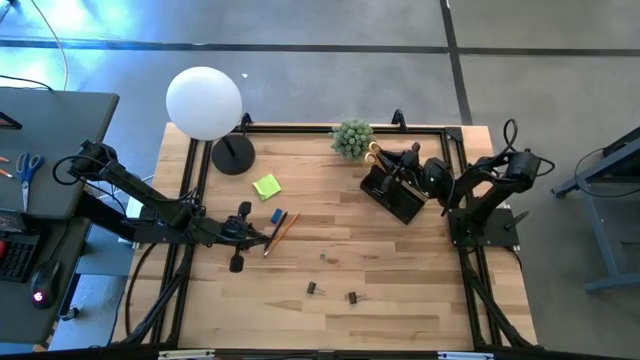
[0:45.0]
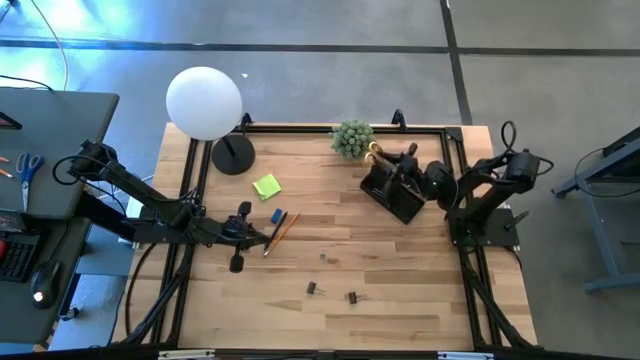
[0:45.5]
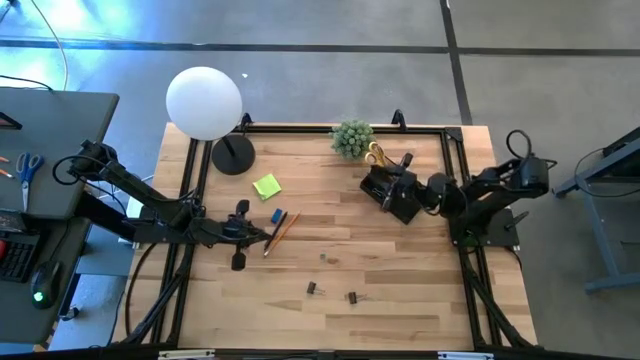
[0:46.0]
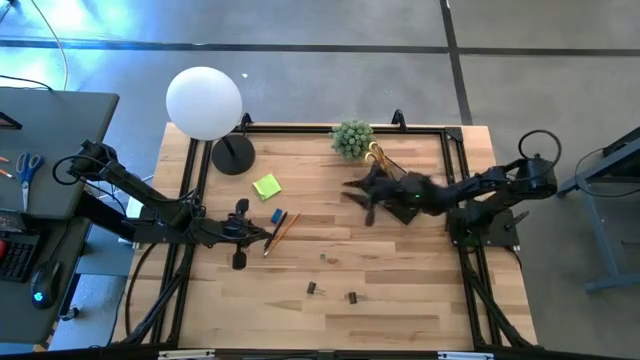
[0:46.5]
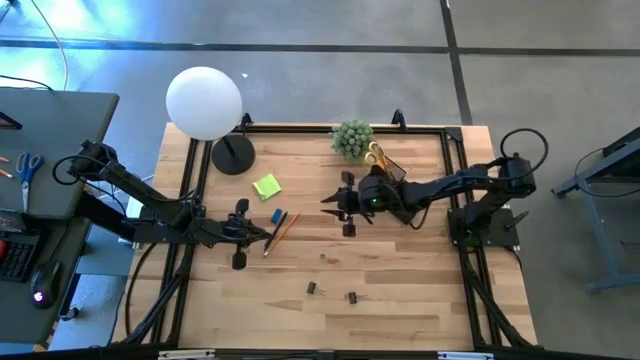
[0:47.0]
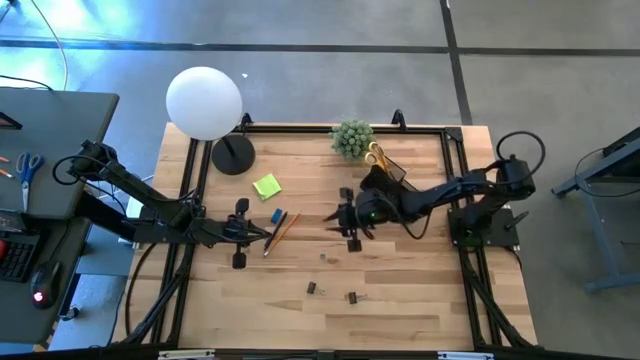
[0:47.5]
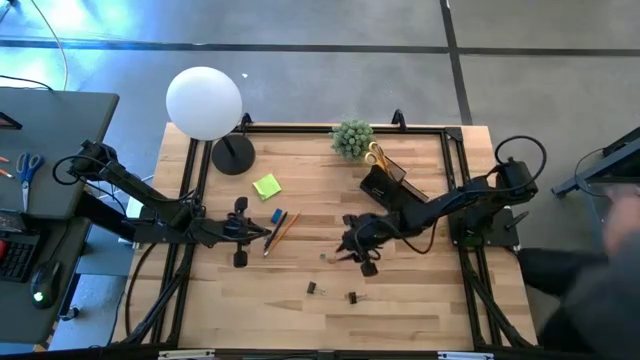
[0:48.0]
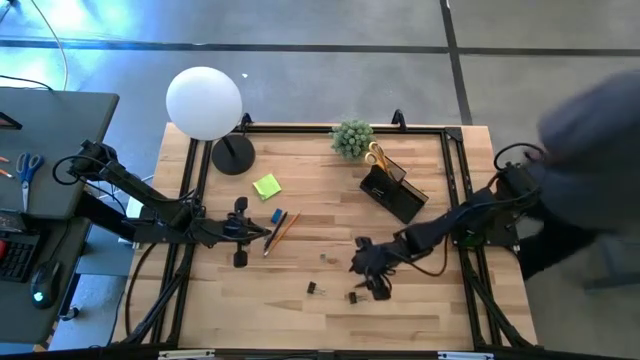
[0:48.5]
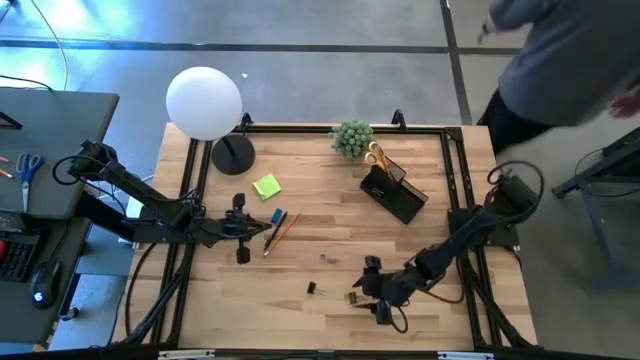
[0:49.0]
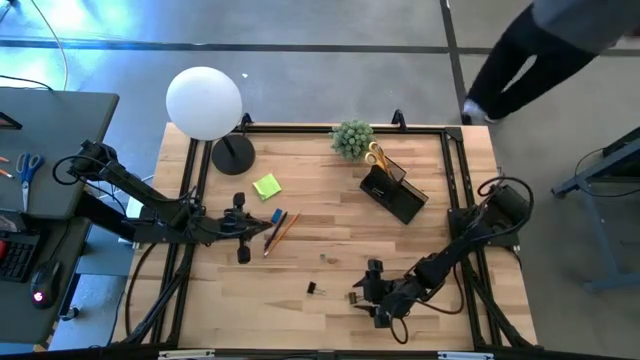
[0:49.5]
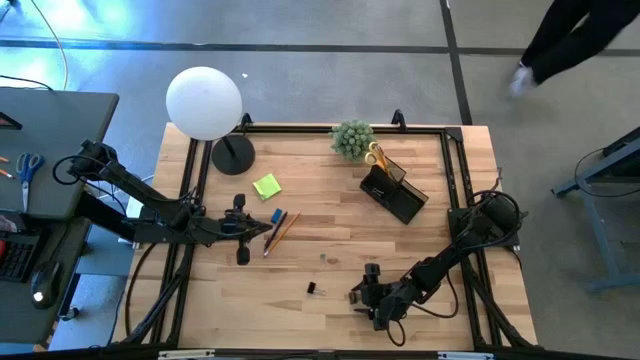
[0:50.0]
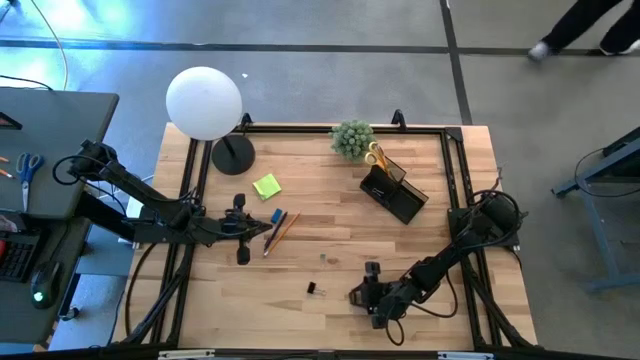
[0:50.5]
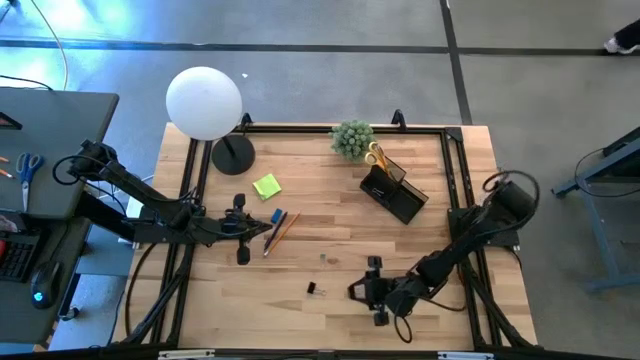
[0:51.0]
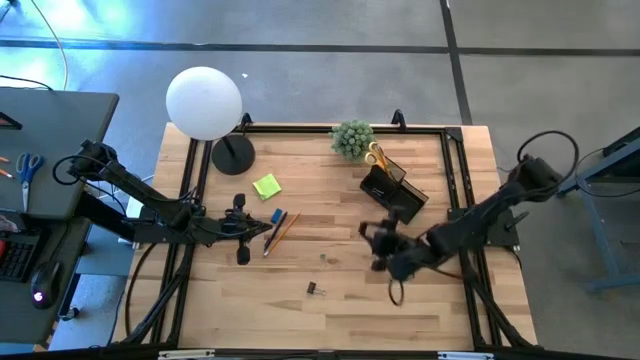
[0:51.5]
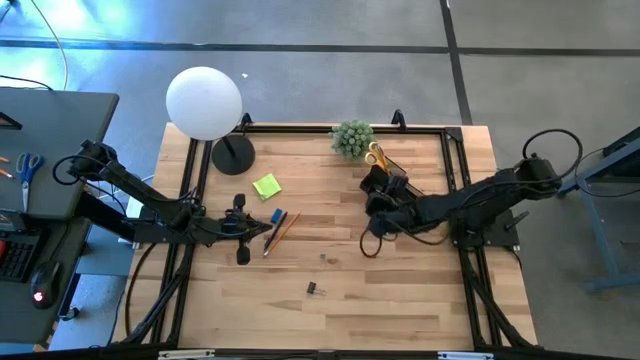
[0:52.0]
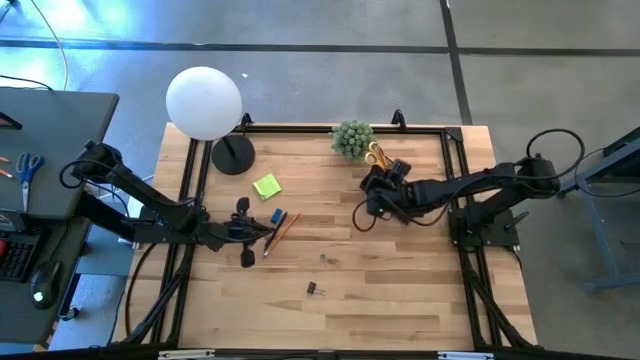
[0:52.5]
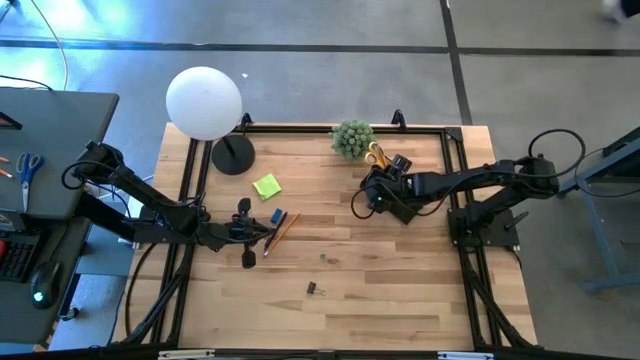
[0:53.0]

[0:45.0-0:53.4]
Task: Pick and place office supplies into organizer
Put the right black binder clip into the desk organizer

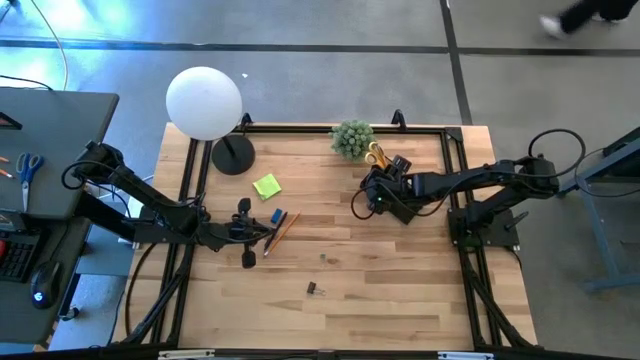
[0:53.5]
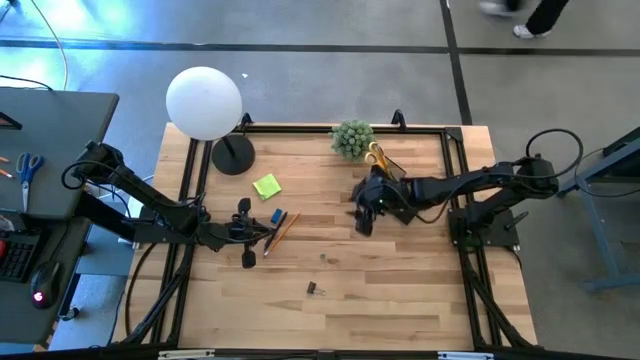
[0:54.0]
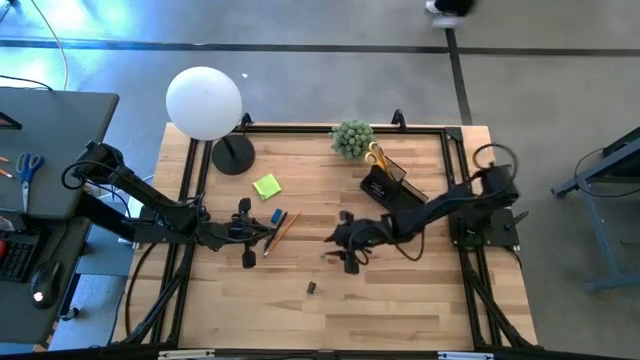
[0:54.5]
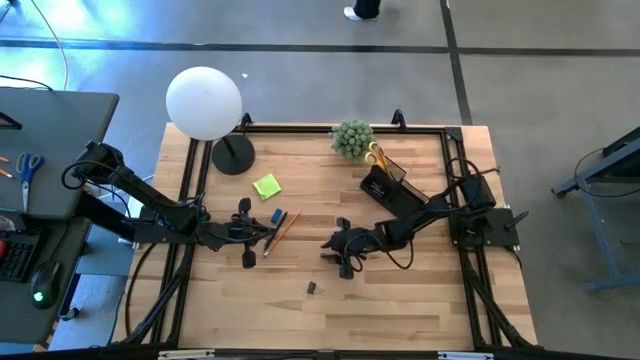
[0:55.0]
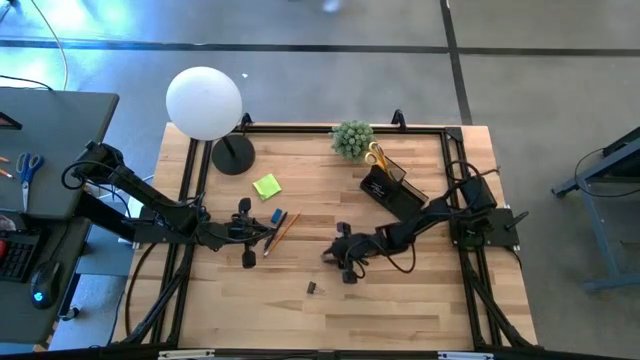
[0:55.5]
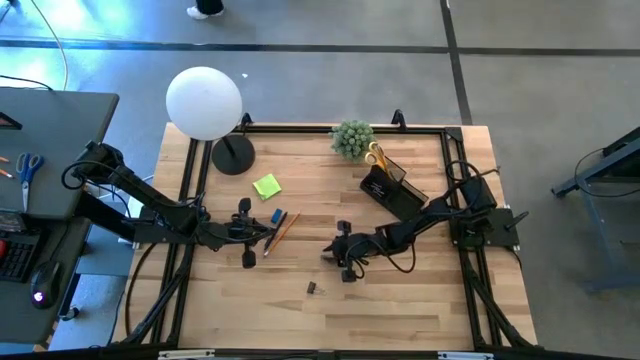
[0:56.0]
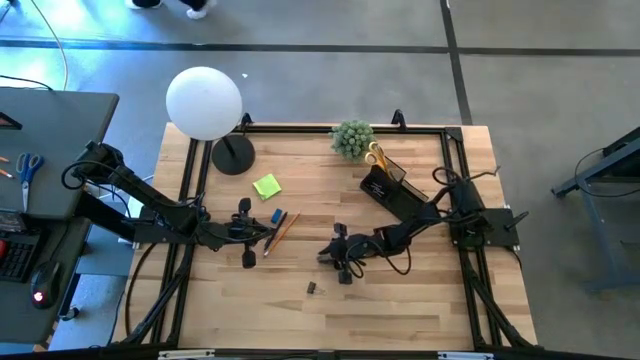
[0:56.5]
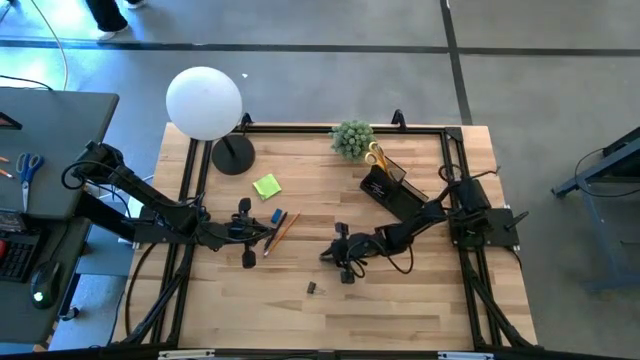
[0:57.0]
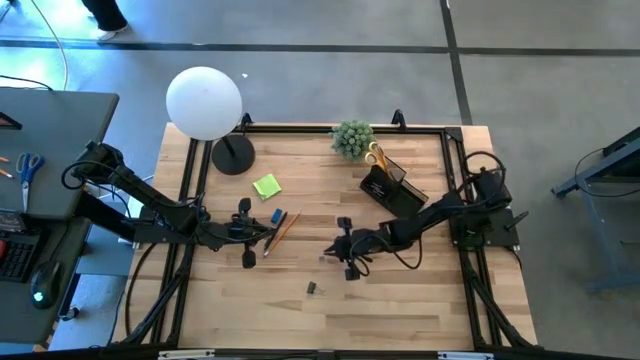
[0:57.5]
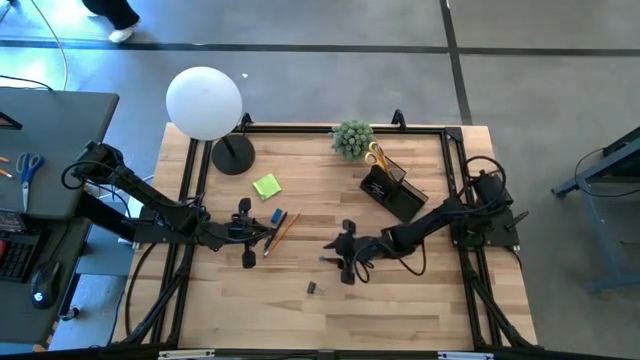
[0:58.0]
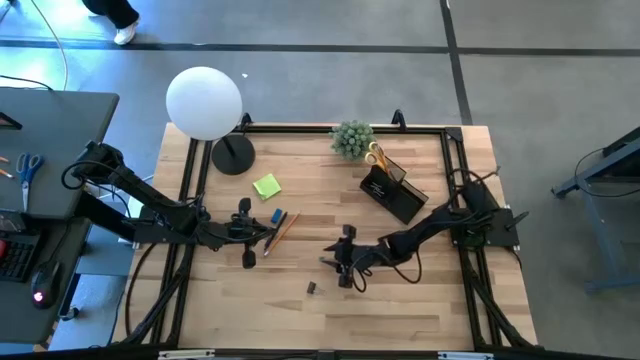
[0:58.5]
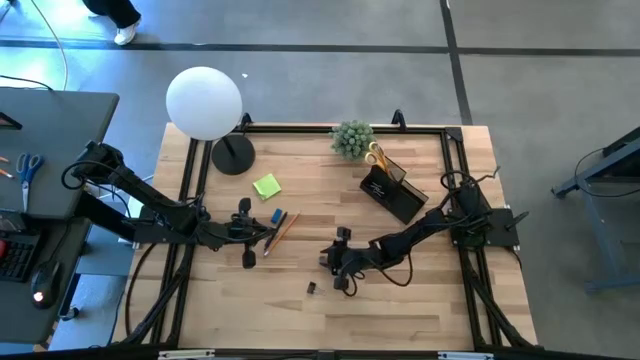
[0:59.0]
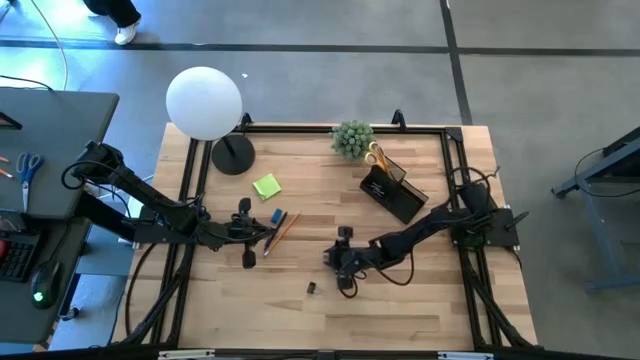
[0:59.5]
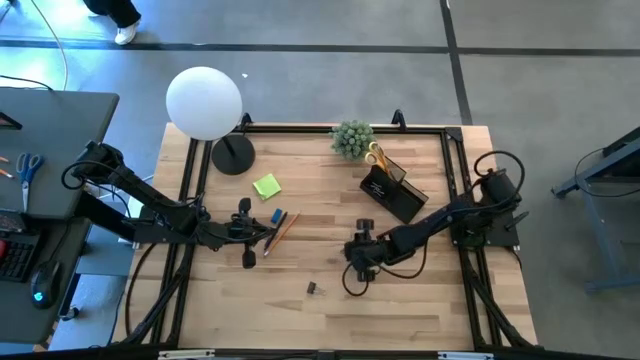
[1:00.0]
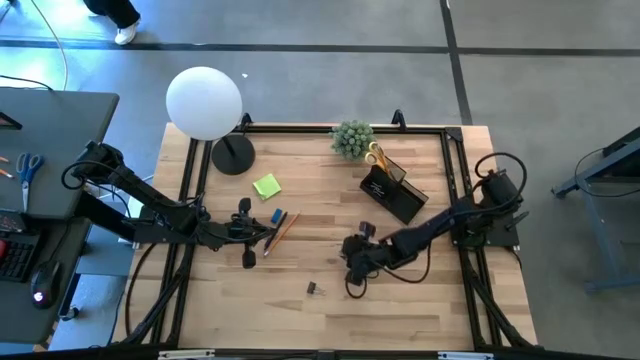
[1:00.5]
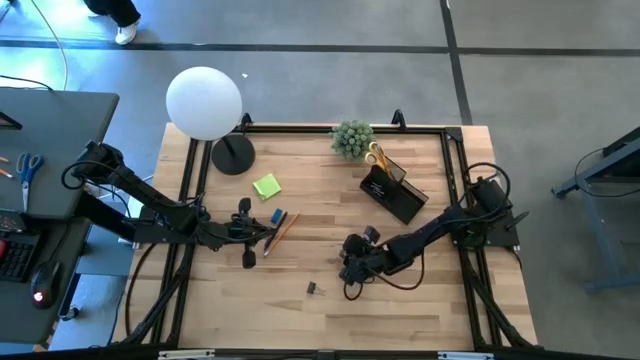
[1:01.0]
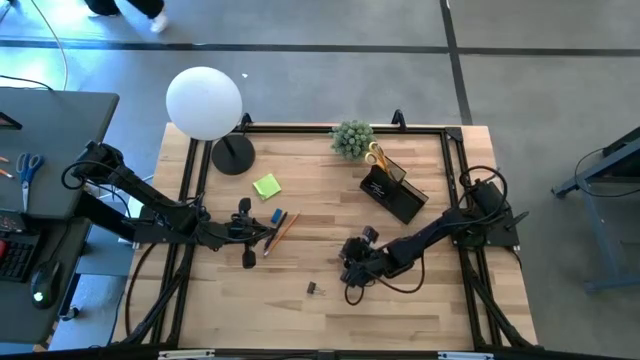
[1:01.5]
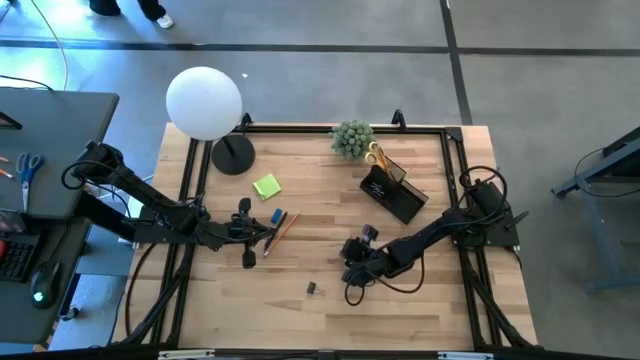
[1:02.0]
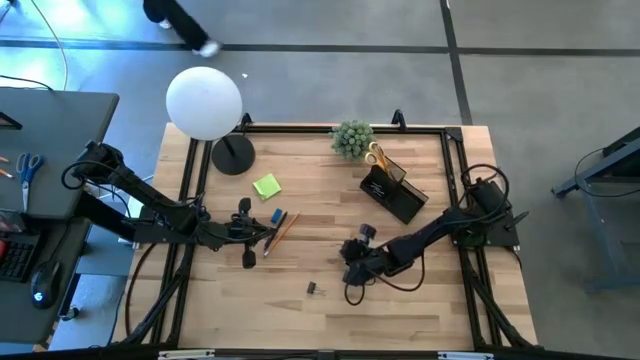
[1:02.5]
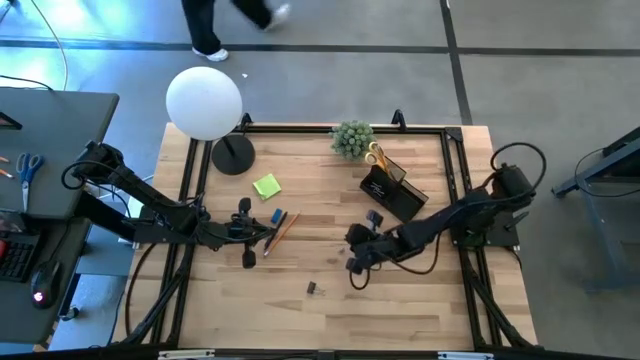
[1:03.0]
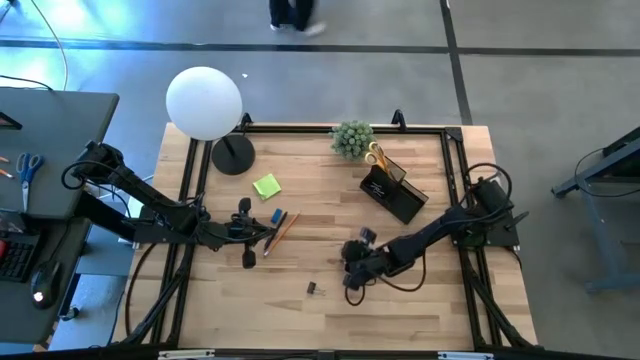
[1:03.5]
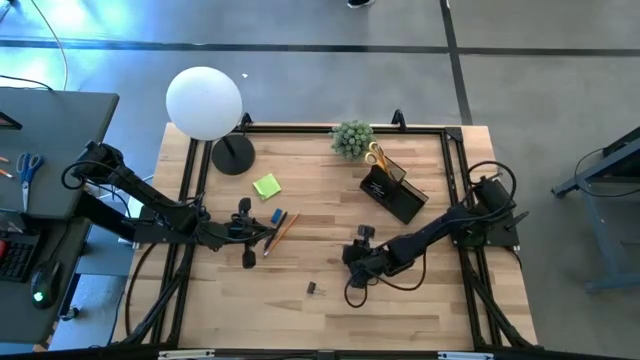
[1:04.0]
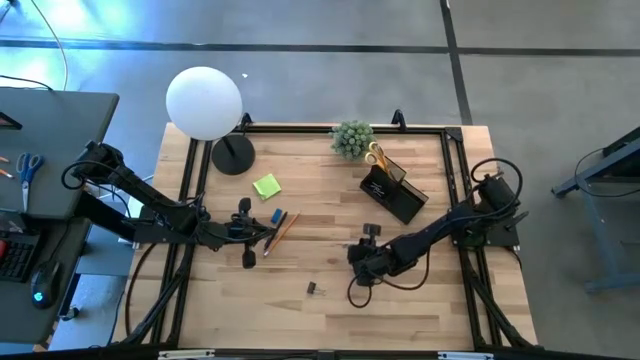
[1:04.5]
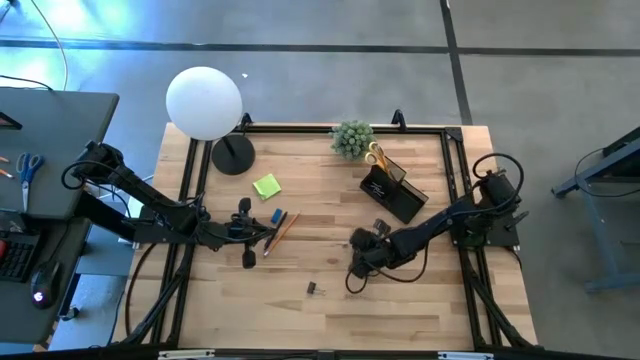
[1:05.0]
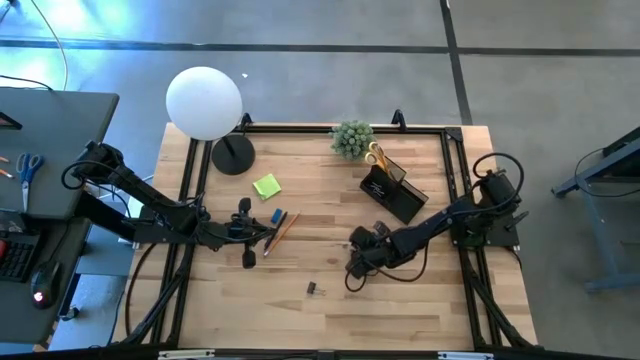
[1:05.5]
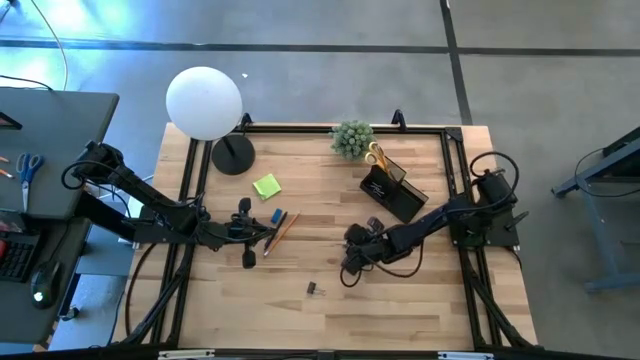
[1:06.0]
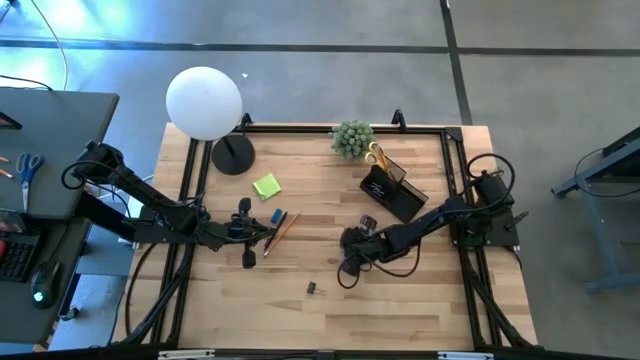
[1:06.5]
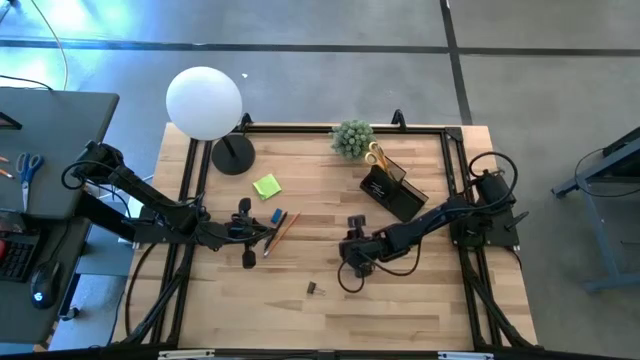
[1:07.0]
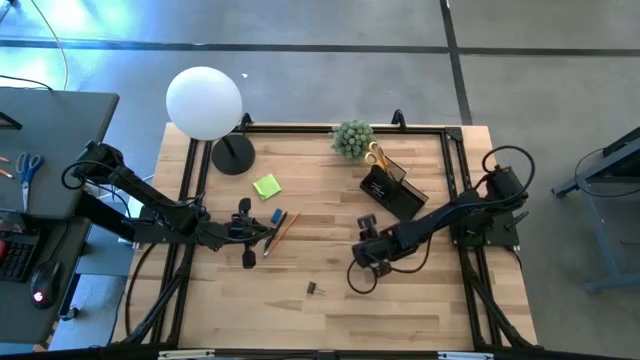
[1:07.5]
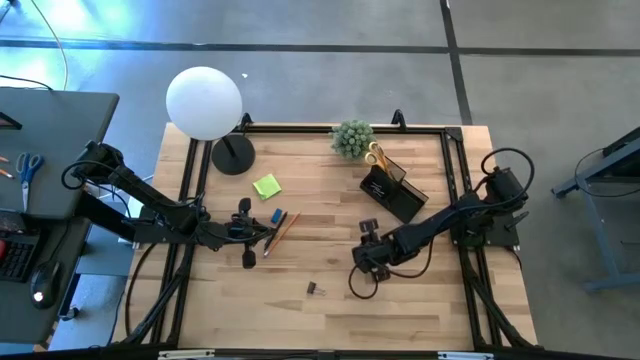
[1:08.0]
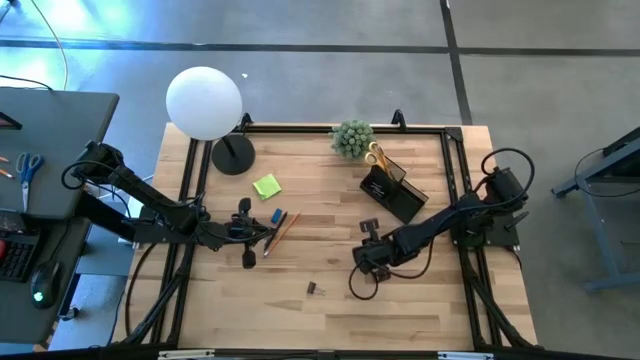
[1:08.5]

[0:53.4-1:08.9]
Put the blue binder clip into the desk organizer
